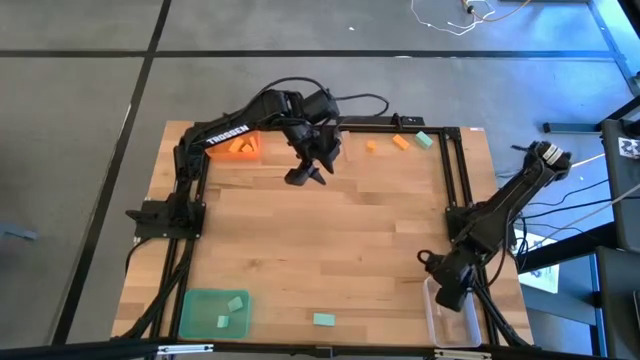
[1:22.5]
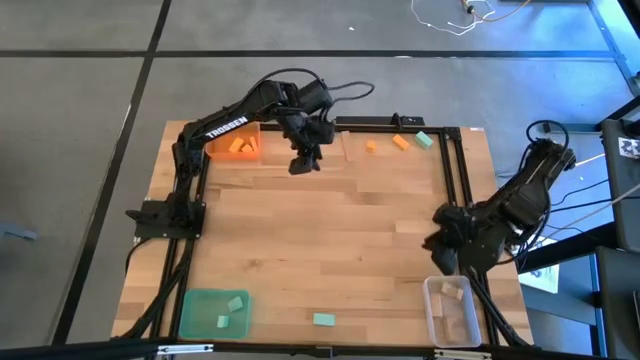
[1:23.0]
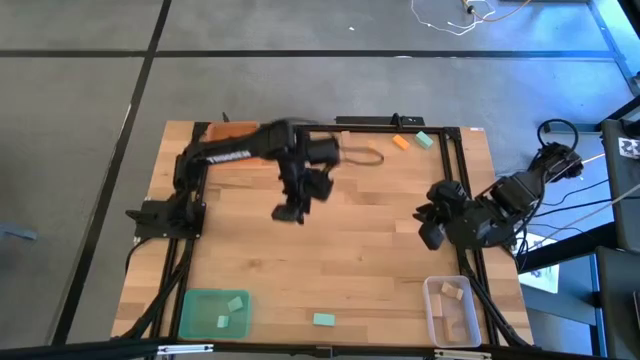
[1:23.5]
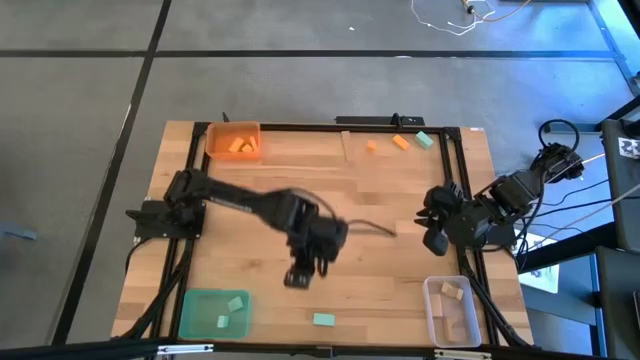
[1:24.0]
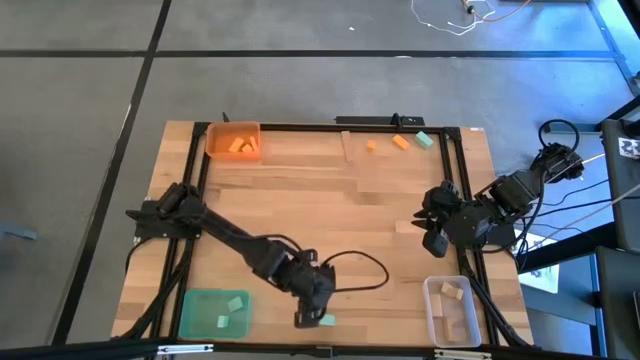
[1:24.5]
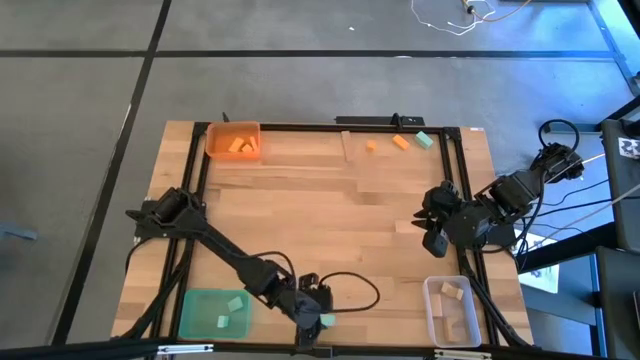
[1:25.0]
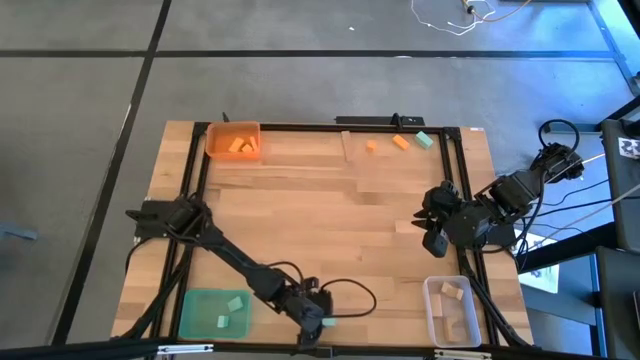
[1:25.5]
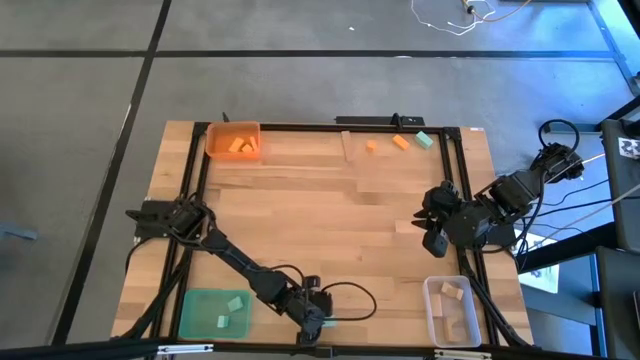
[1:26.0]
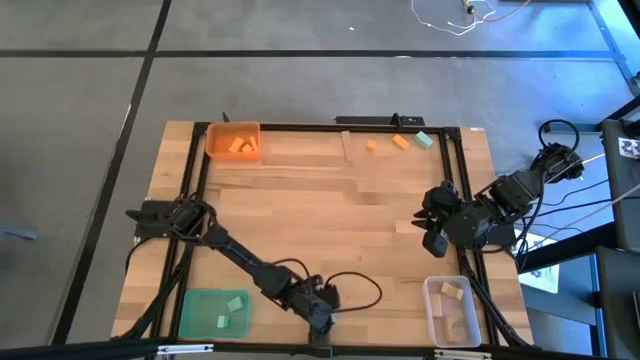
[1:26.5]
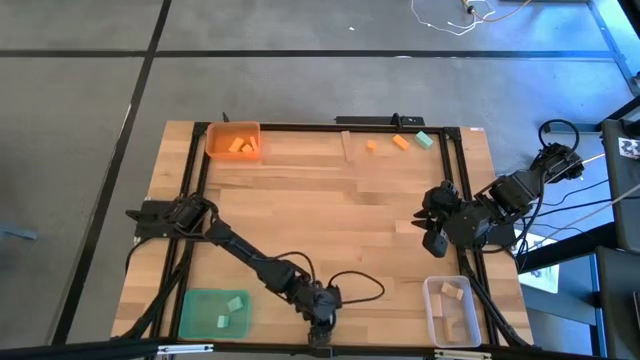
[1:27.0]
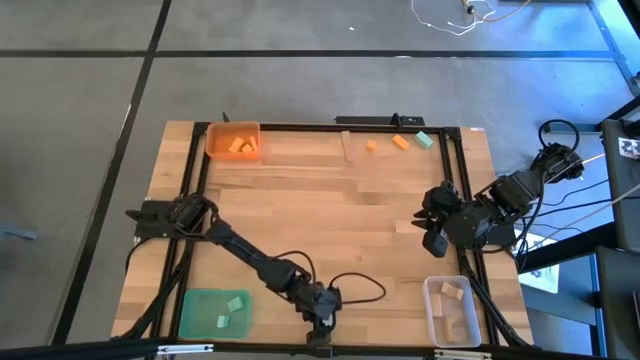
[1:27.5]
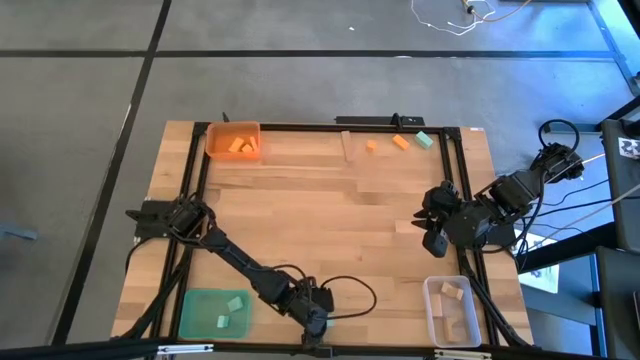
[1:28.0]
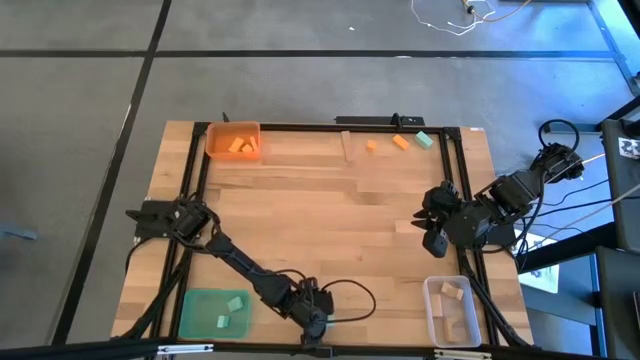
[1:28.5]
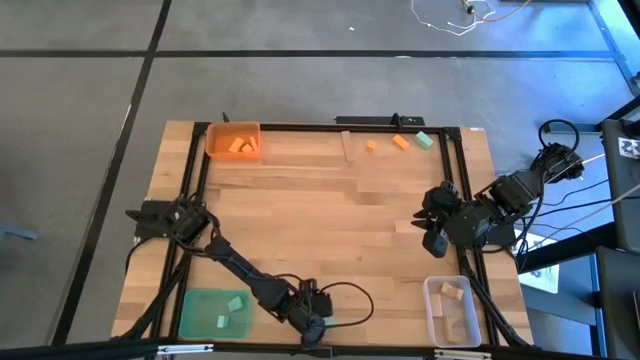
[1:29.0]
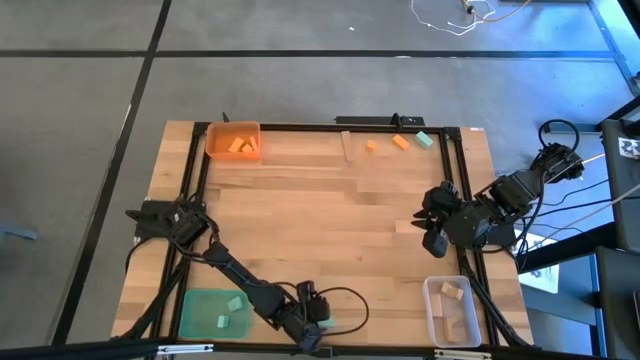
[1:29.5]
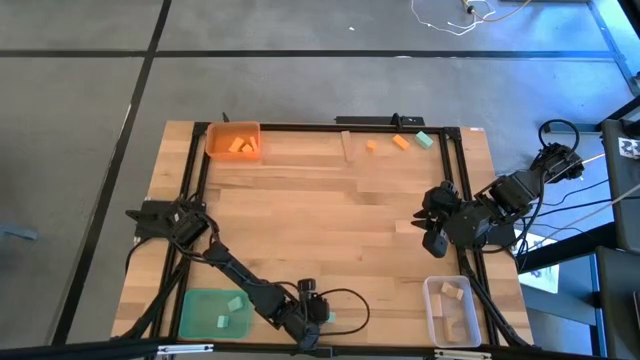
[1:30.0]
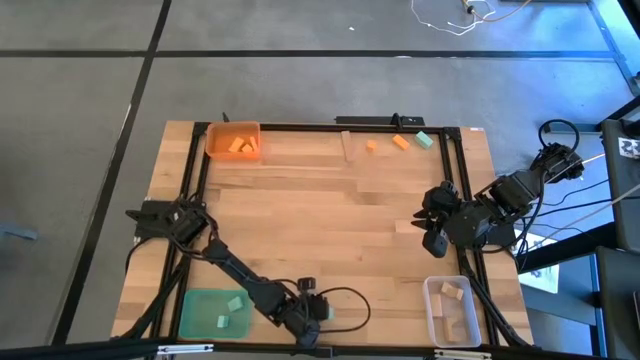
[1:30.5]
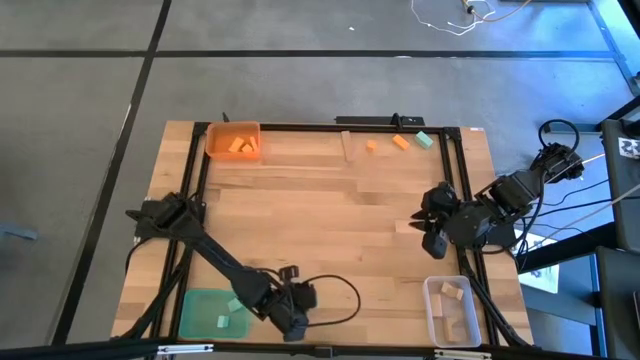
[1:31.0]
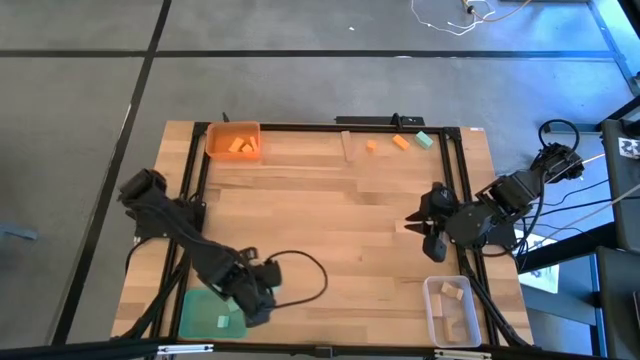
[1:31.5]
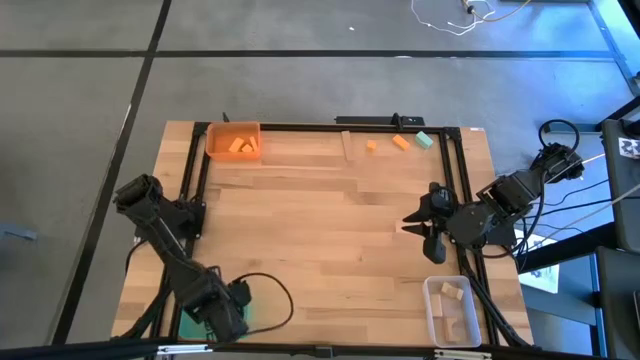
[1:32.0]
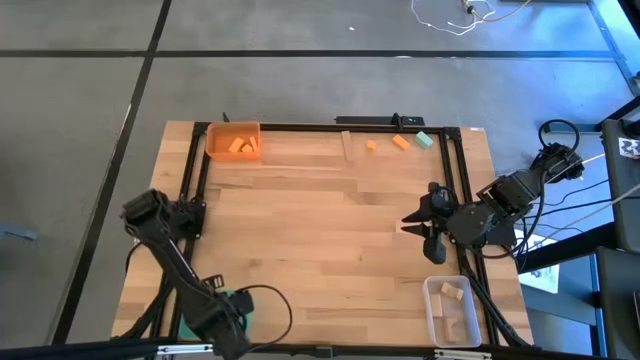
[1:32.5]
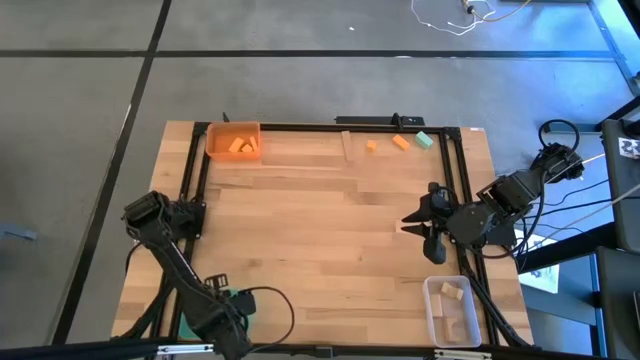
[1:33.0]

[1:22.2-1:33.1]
Task: Sort & place blocks by color
Put the blue block into the blue bin

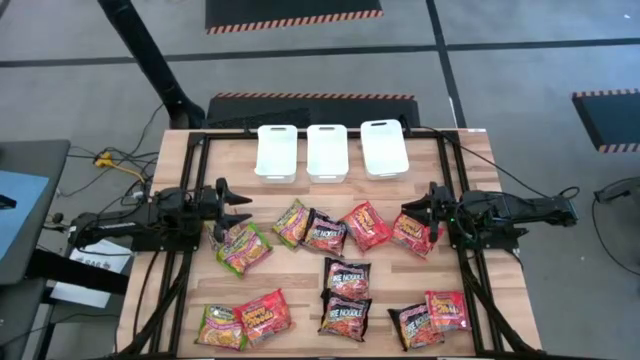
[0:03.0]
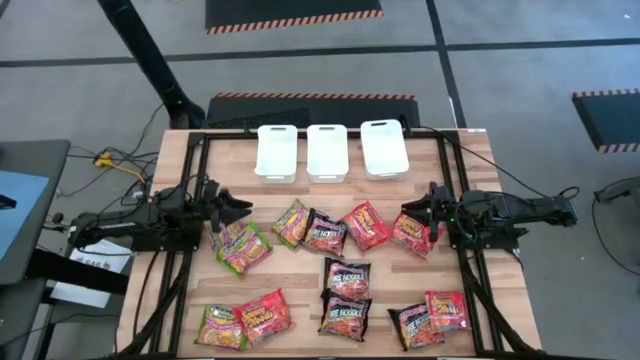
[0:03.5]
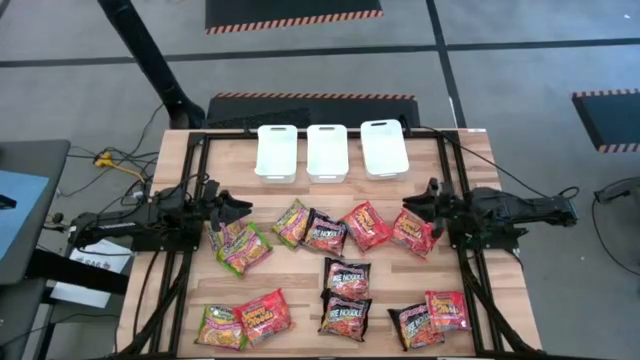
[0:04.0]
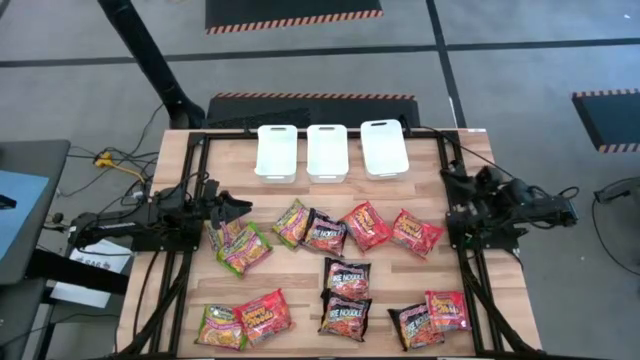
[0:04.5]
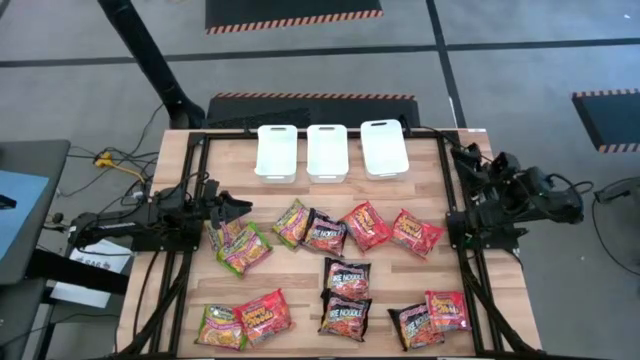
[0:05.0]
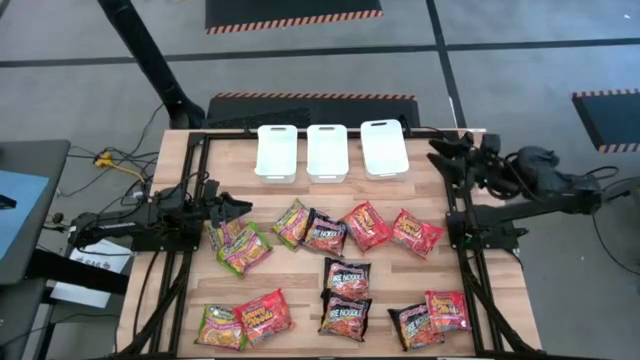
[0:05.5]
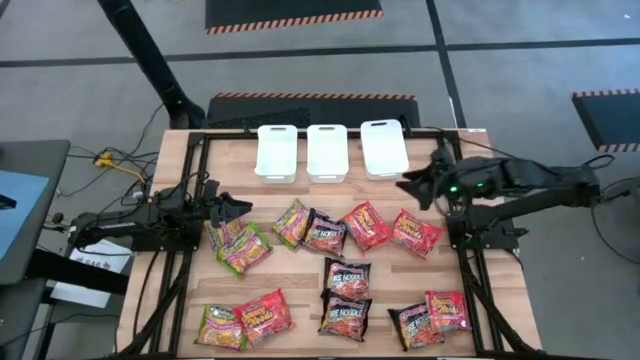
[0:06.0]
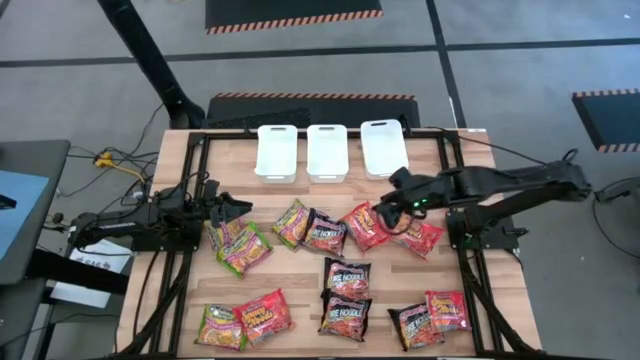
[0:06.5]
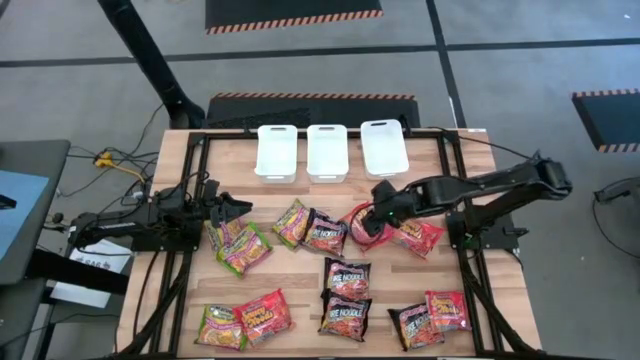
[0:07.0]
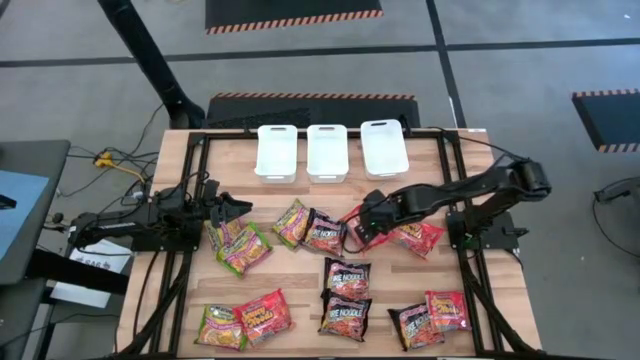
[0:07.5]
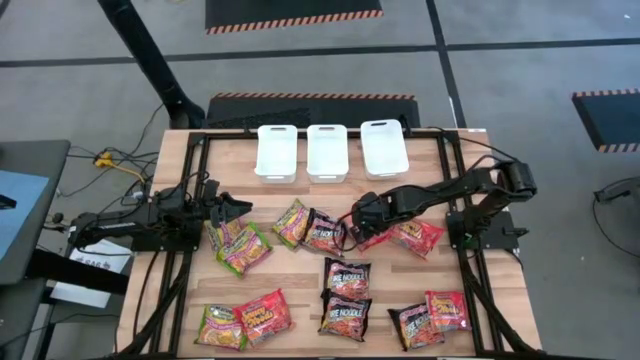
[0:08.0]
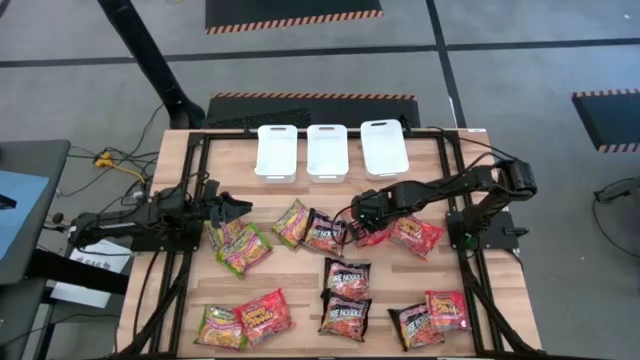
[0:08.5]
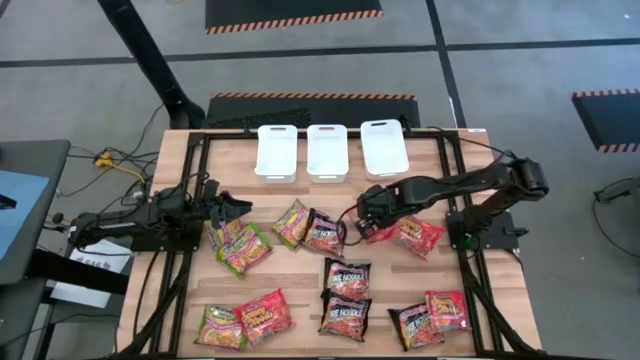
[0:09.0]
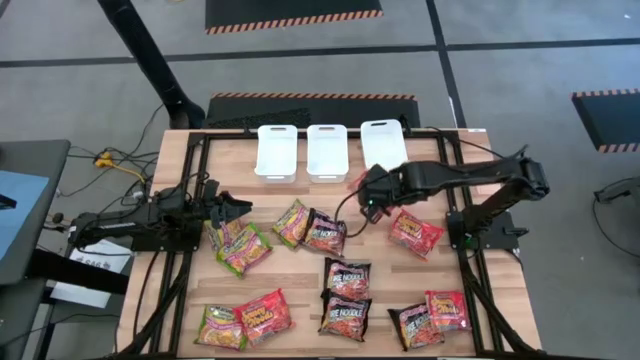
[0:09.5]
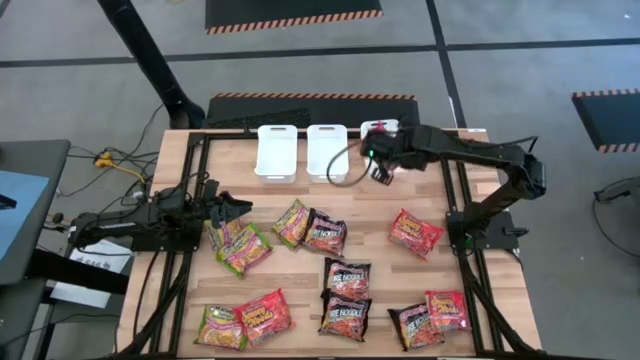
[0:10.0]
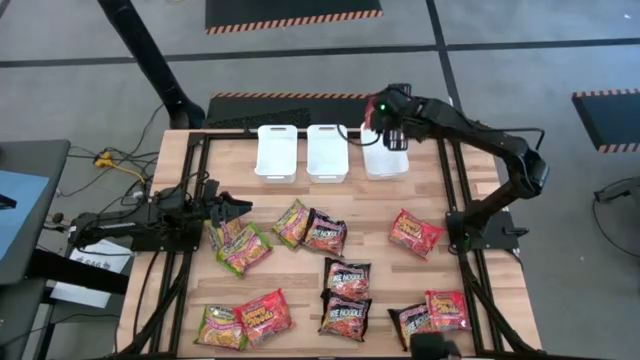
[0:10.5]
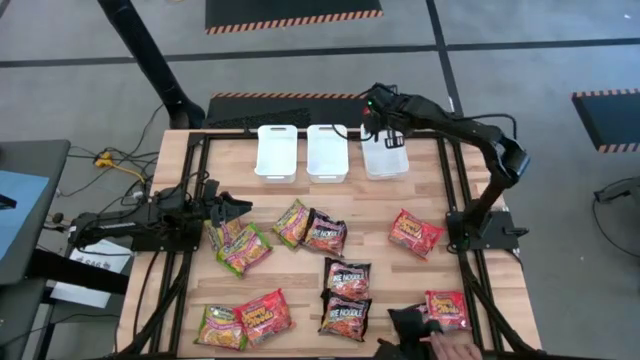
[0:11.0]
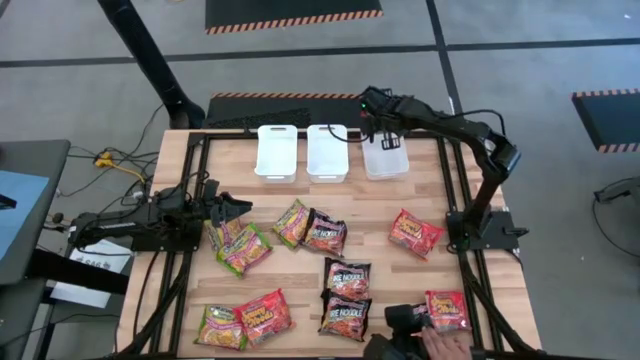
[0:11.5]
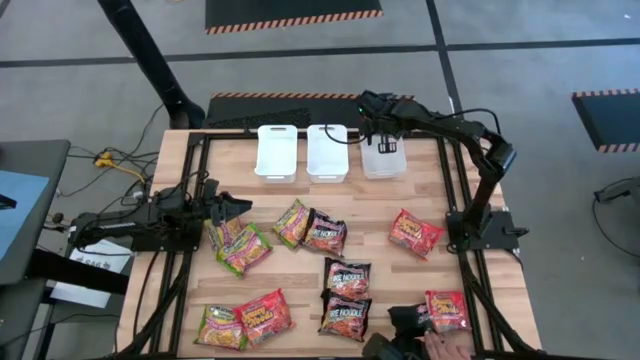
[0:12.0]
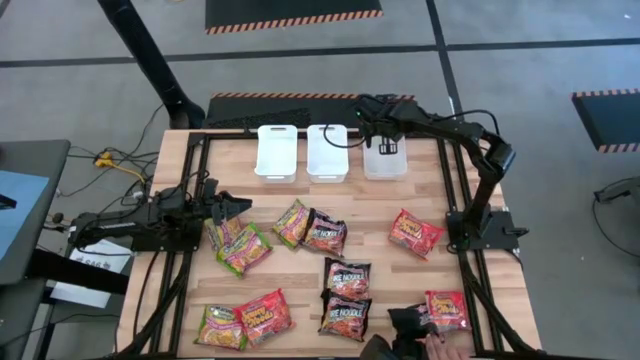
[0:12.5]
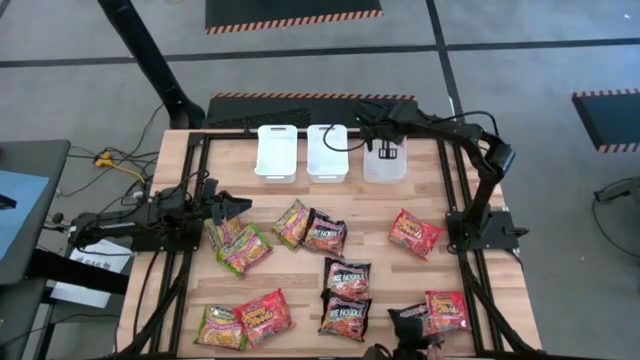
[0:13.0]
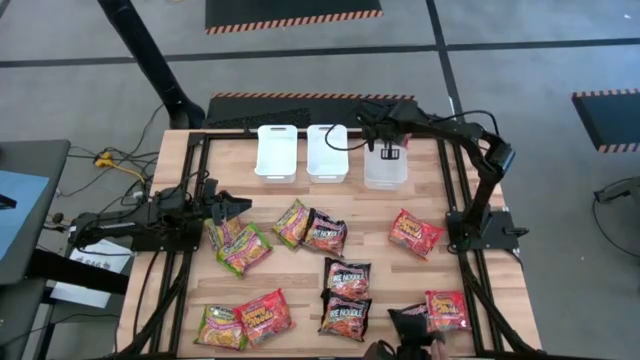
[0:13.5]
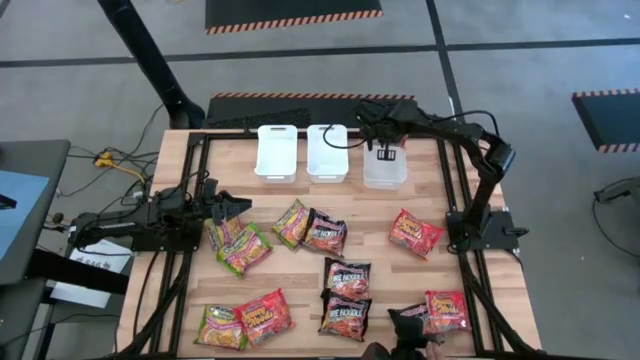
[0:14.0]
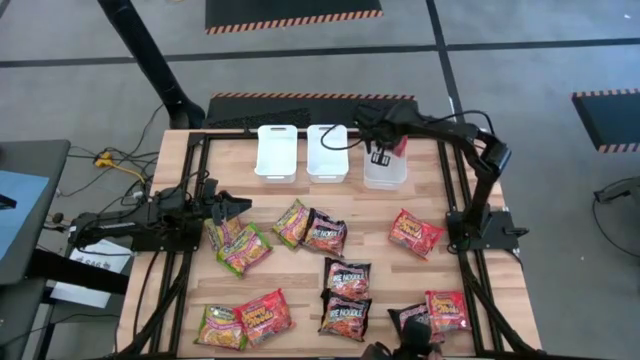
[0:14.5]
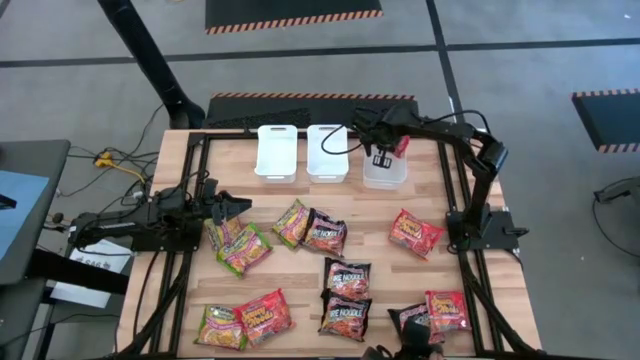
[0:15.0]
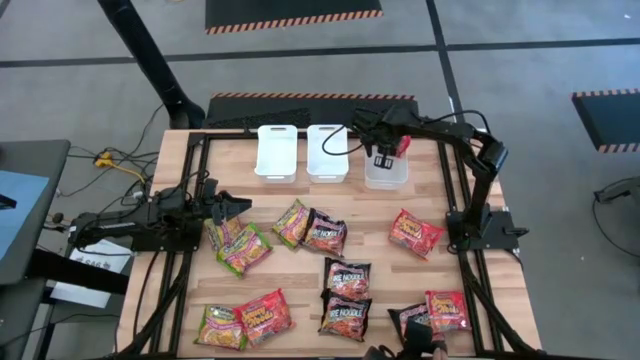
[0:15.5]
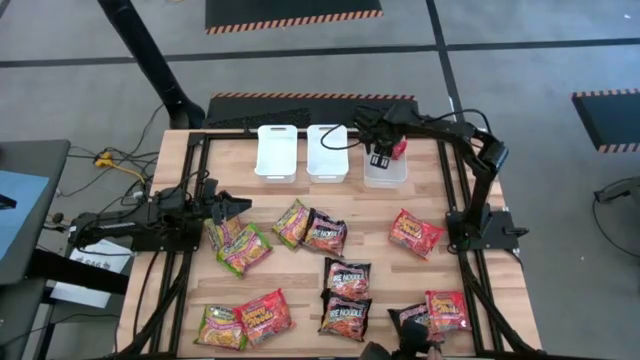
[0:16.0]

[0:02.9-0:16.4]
Task: Sort Maruchan noodles
Put the orange noodle pack into the right white bin
